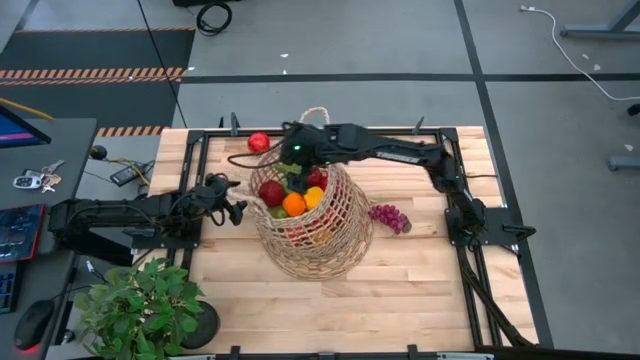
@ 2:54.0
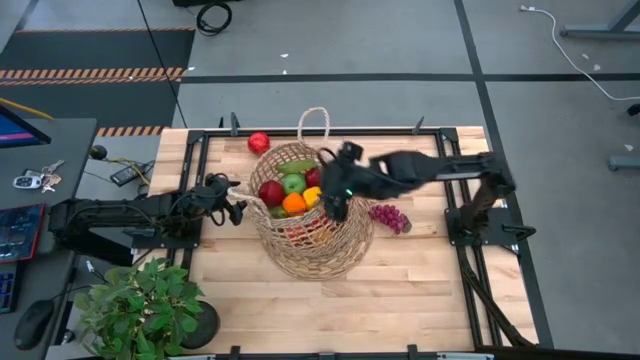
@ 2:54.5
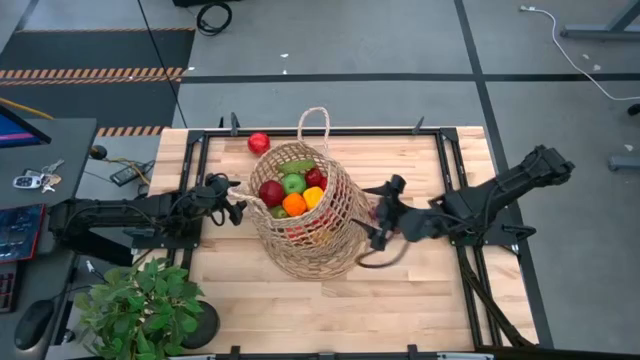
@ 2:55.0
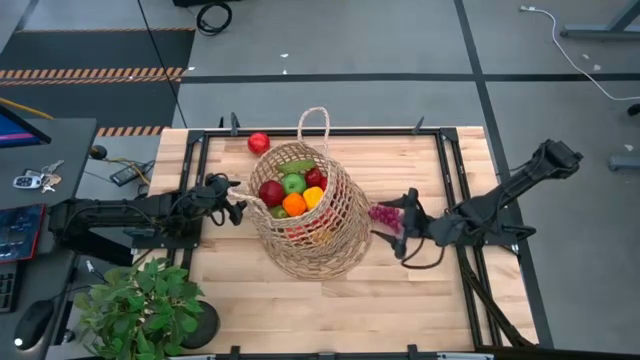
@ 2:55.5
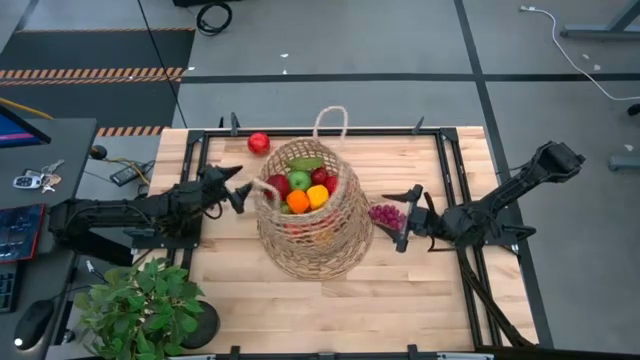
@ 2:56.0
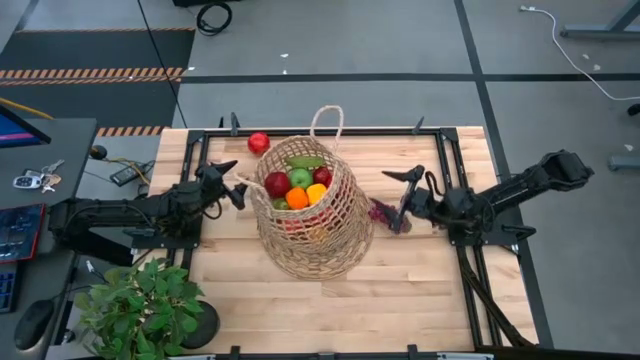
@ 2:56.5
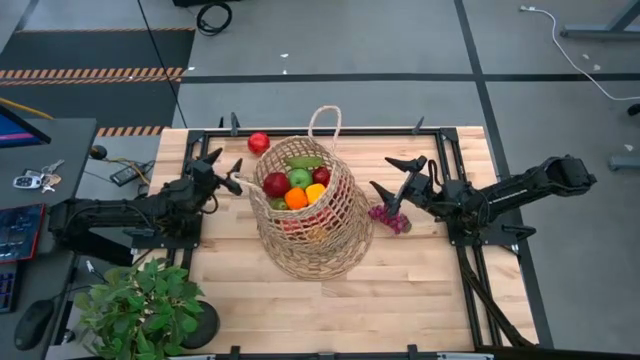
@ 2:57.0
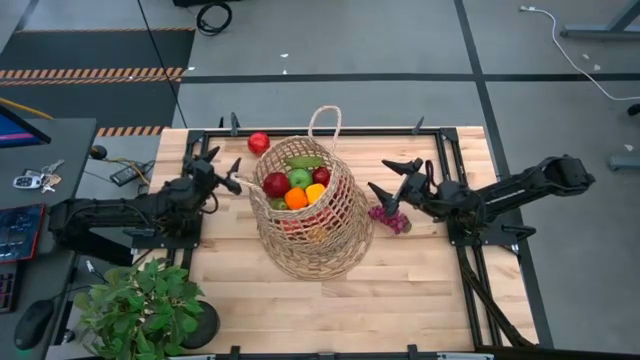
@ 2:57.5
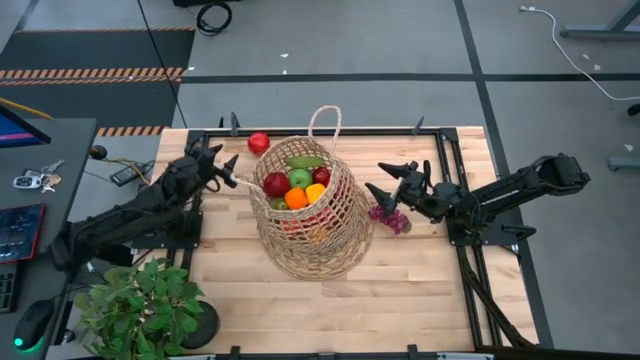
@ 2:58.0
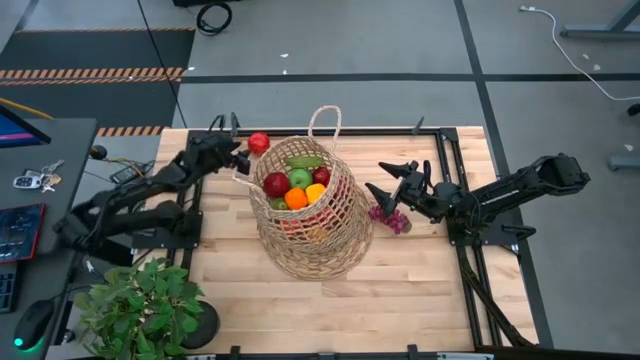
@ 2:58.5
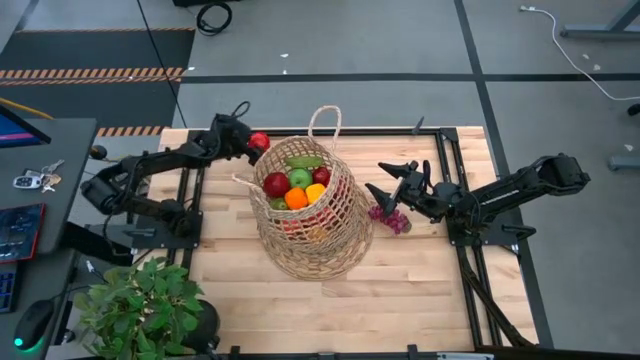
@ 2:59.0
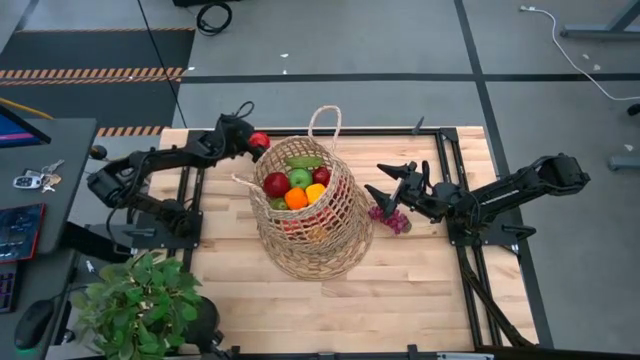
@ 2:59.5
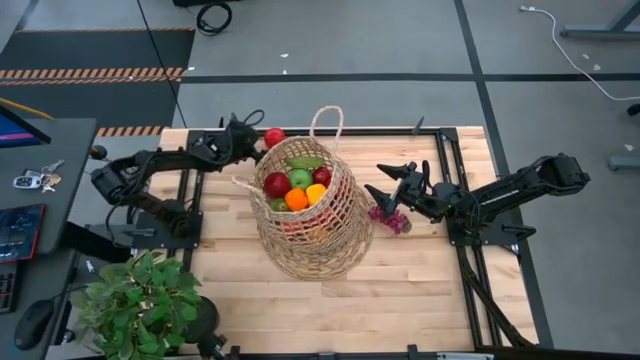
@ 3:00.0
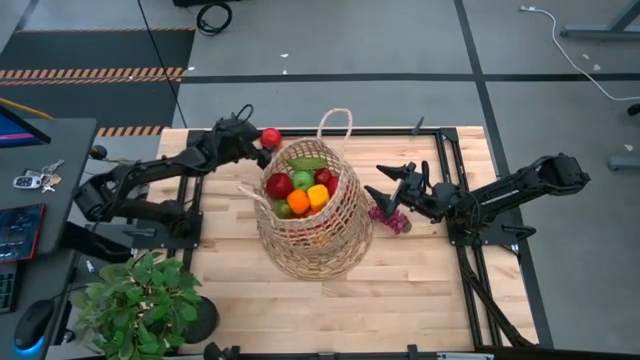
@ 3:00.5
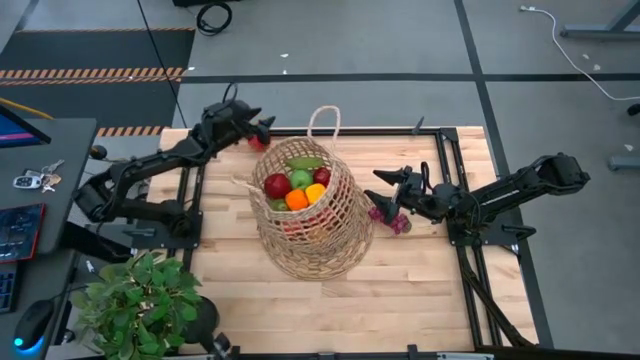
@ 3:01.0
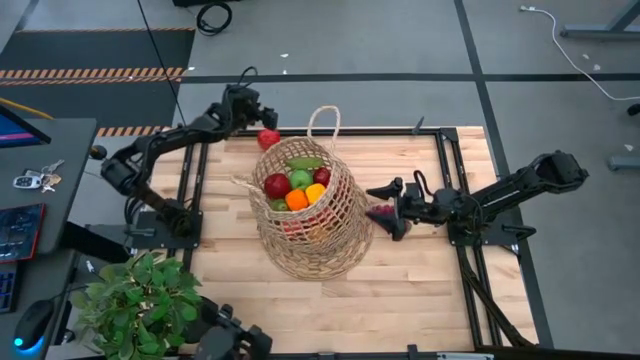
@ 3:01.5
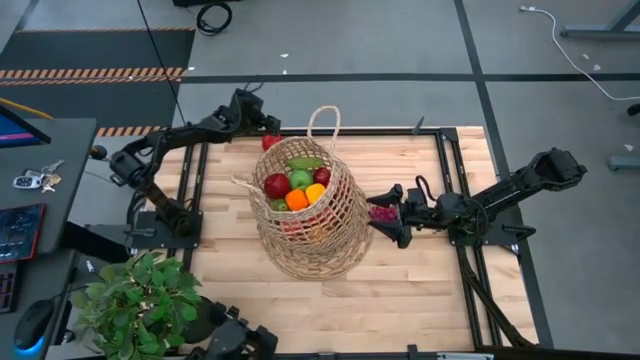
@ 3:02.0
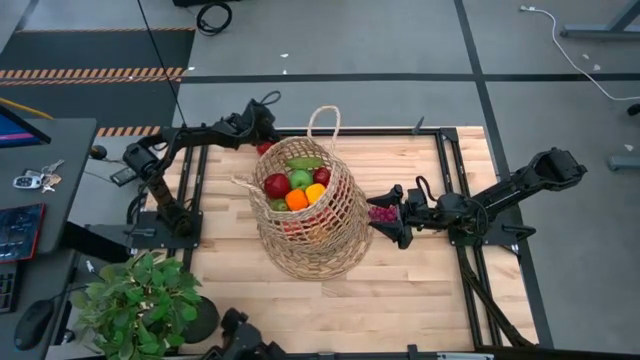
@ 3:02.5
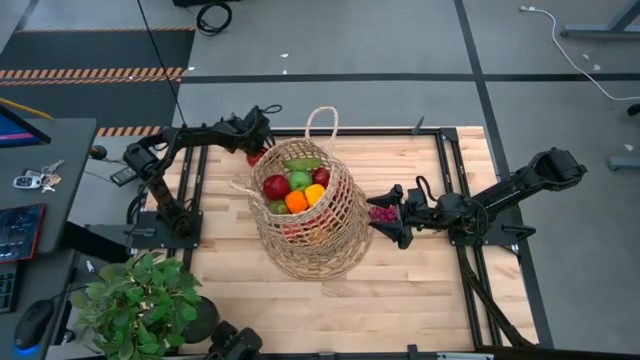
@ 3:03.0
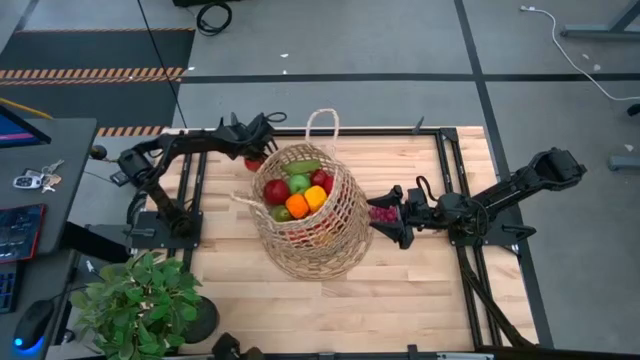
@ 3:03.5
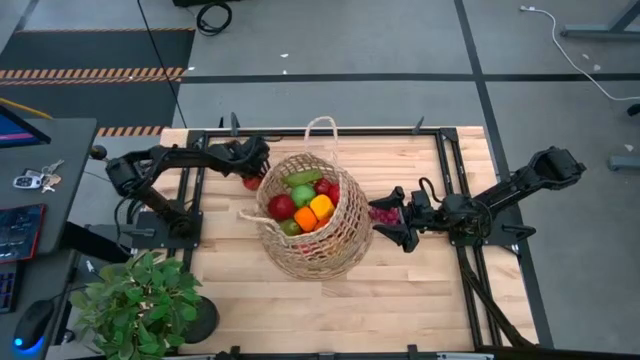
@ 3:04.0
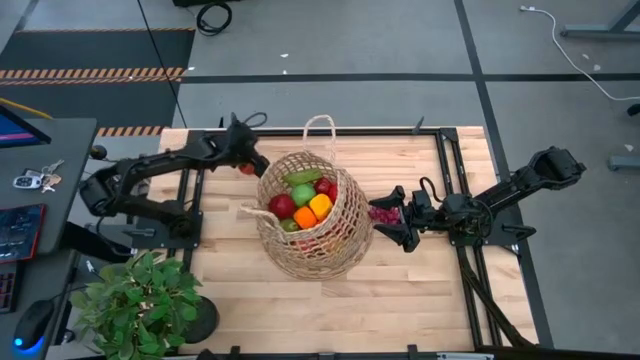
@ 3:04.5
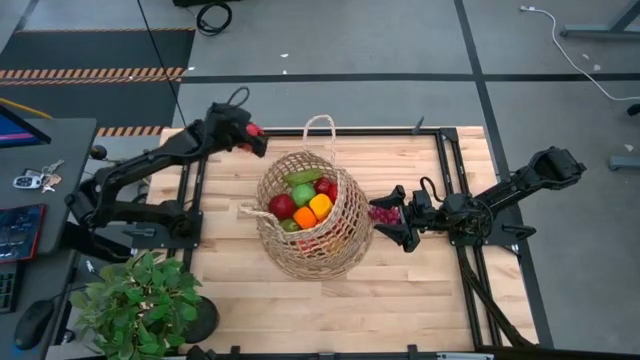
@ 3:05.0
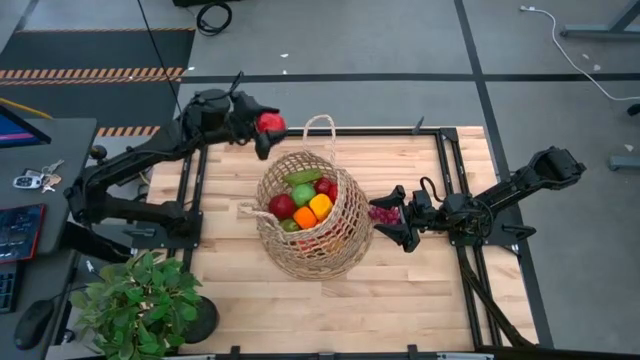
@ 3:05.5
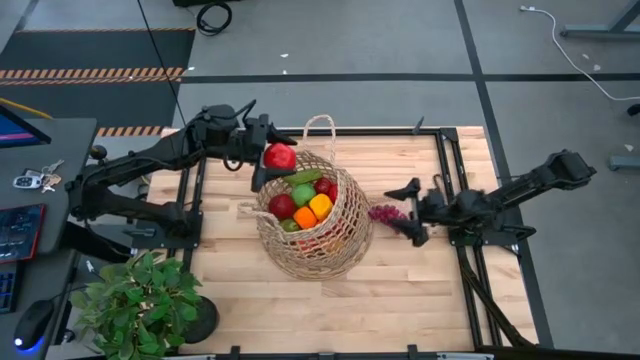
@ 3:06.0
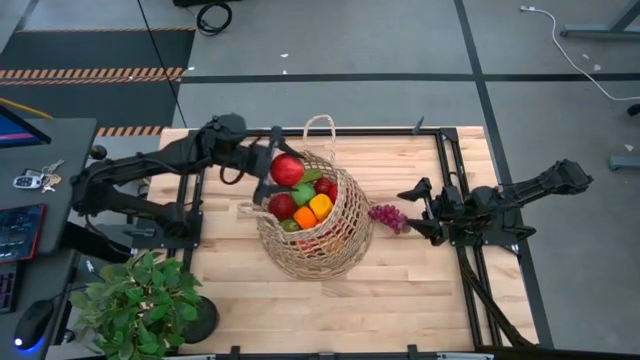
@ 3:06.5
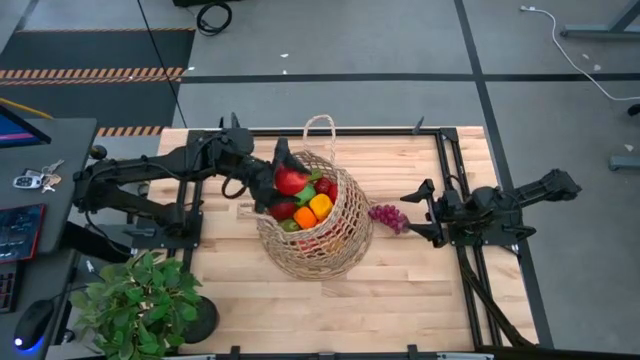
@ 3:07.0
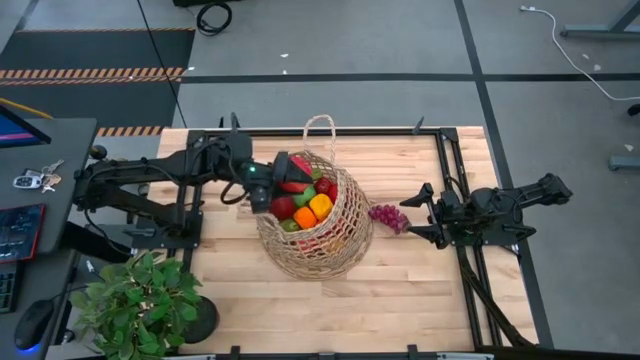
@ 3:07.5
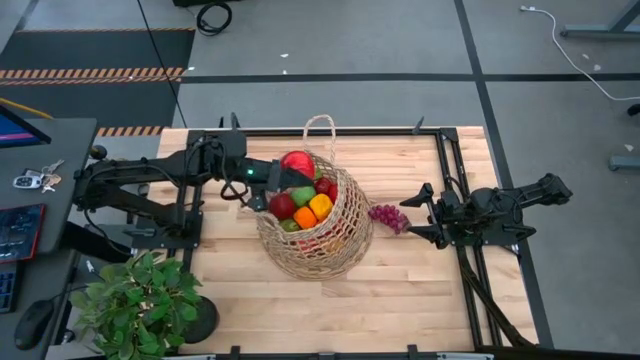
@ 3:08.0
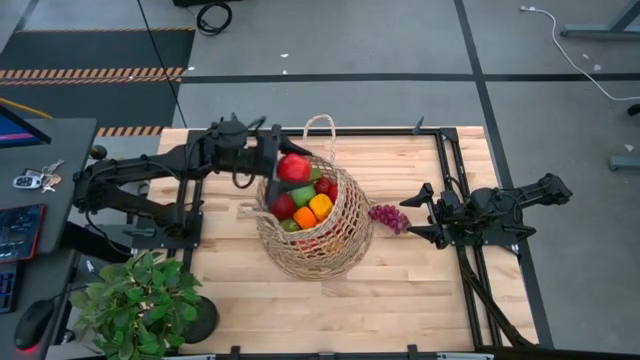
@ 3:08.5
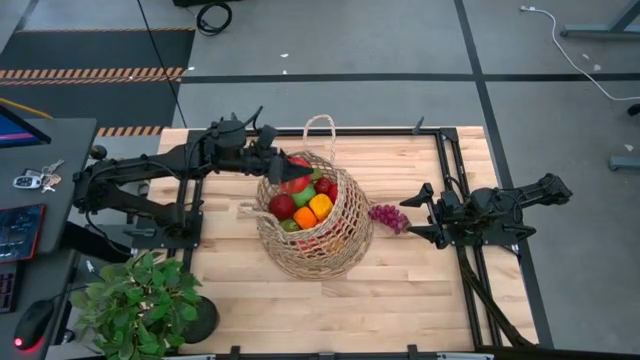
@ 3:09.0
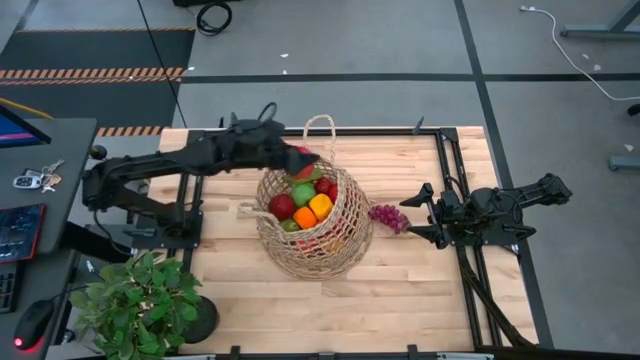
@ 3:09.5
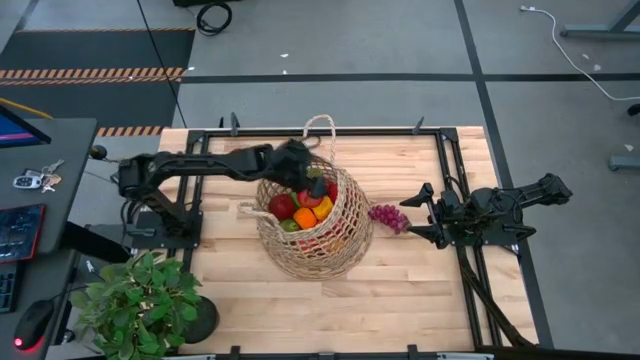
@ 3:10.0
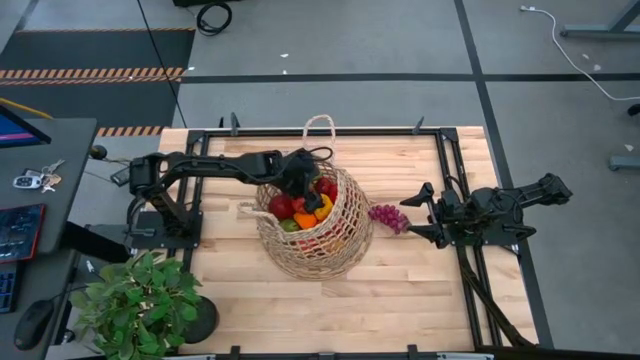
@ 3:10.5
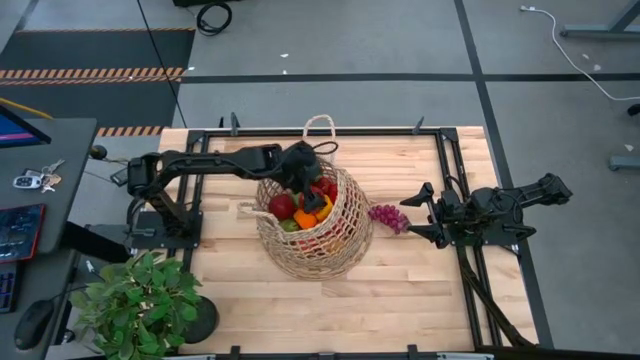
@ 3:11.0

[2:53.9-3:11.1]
Task: Build produce basket
Put the red apple into the basket

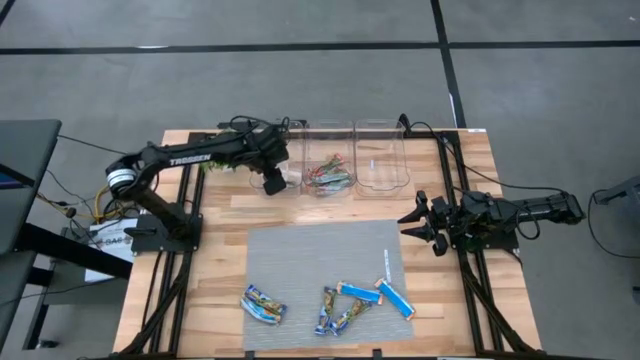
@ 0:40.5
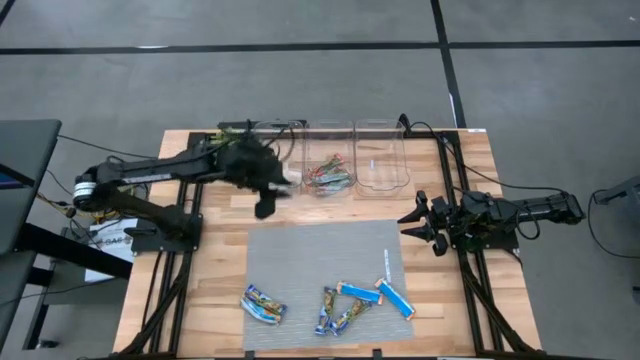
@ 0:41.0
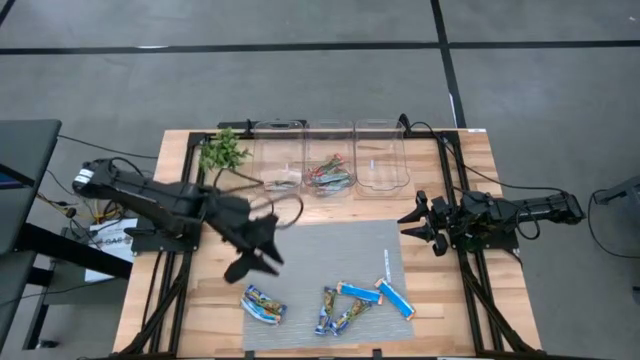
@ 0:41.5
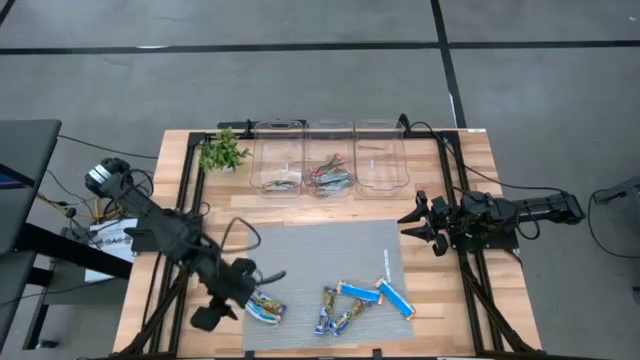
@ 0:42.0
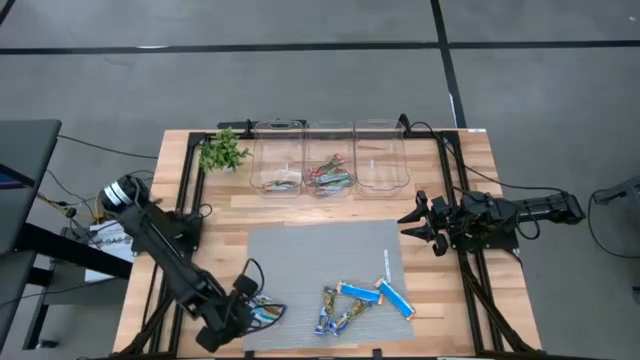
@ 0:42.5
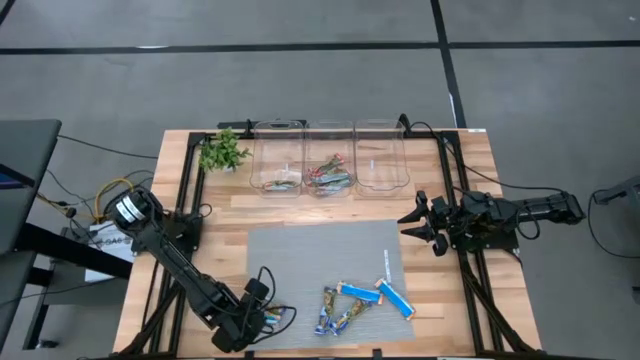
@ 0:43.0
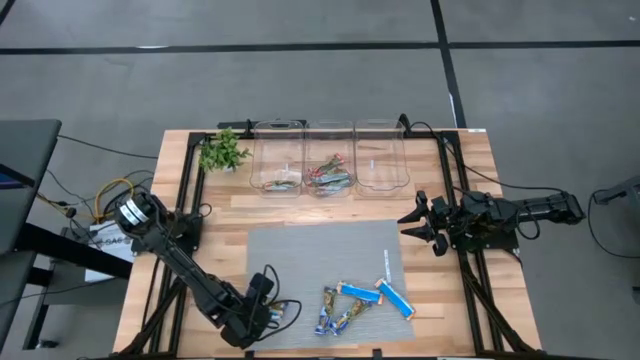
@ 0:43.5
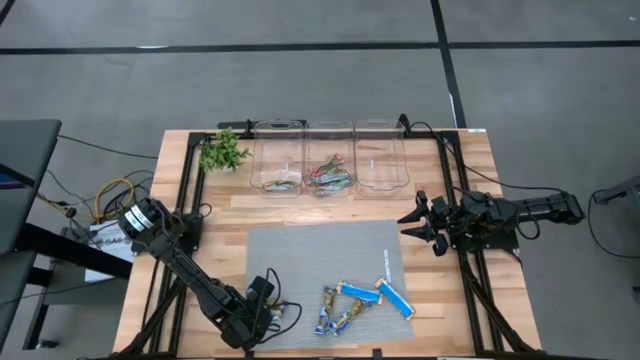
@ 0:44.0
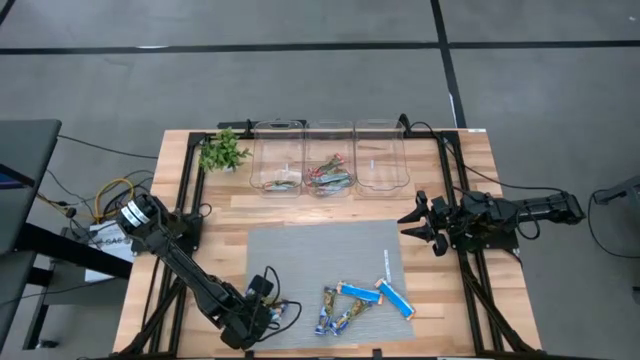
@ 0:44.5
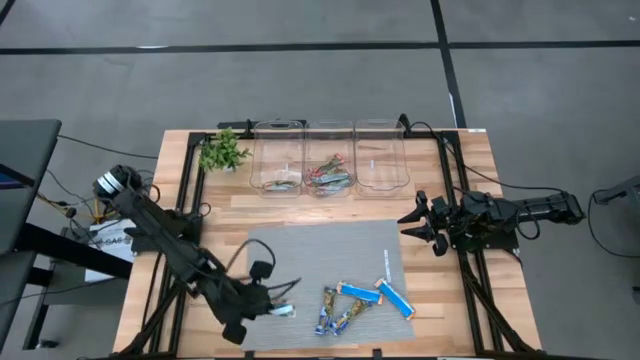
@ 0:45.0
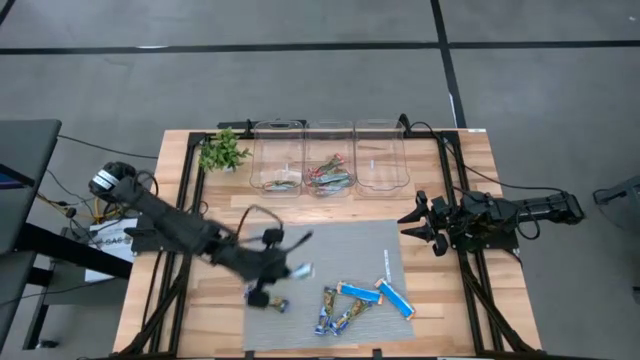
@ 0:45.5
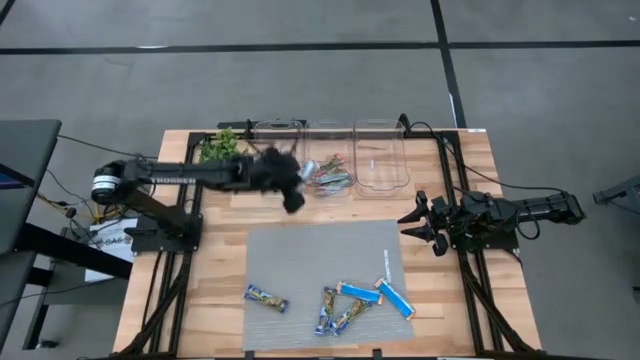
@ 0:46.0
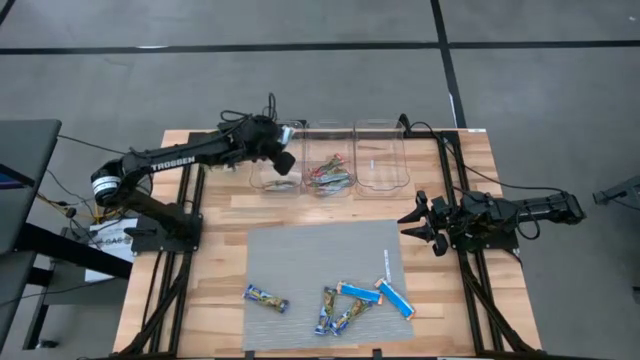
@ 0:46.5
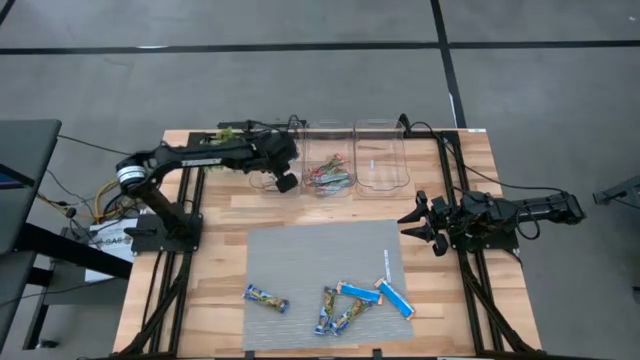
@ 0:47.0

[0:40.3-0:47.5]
Task: Pick and place Granola Bars by type
Put the yellow granola bar into the left transparent bin
